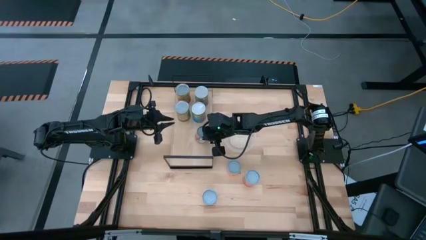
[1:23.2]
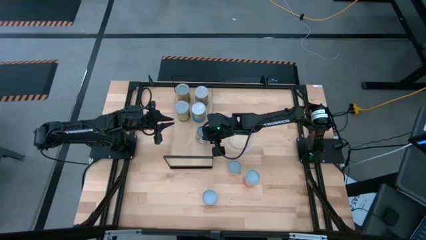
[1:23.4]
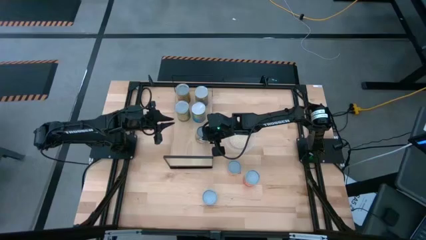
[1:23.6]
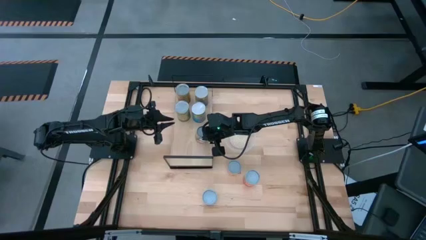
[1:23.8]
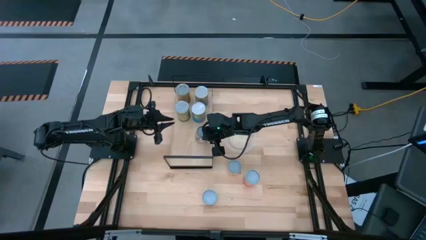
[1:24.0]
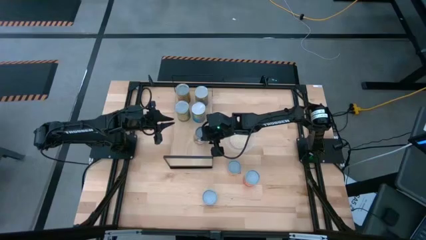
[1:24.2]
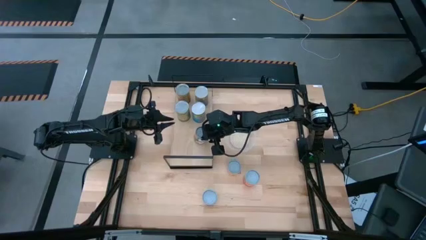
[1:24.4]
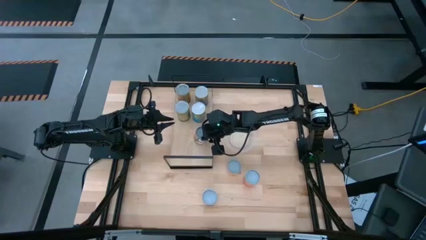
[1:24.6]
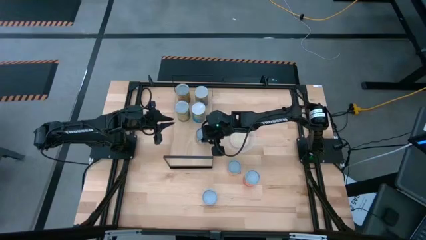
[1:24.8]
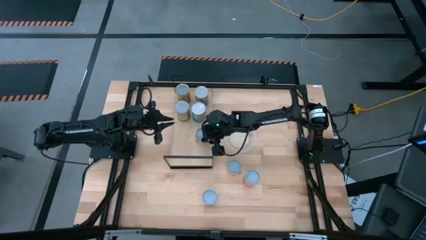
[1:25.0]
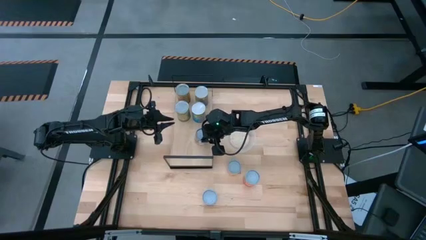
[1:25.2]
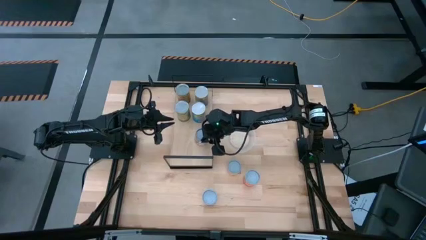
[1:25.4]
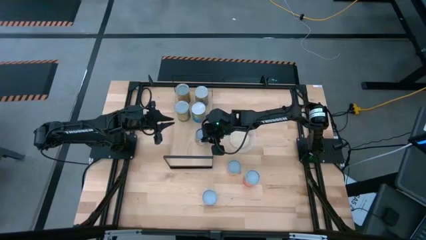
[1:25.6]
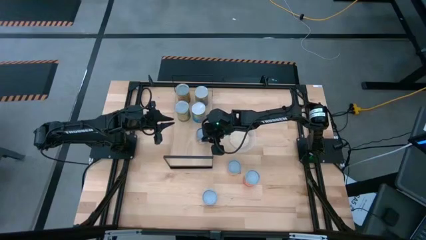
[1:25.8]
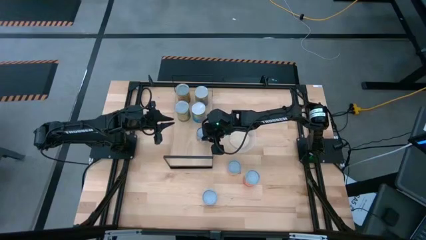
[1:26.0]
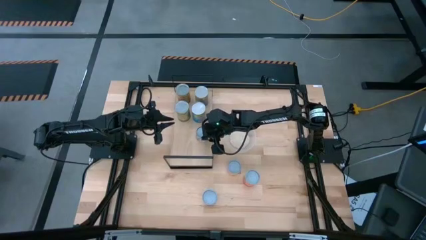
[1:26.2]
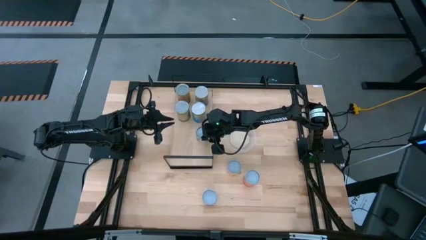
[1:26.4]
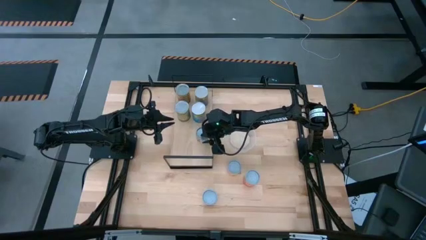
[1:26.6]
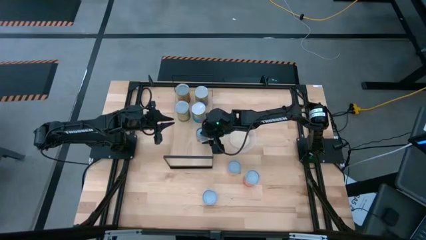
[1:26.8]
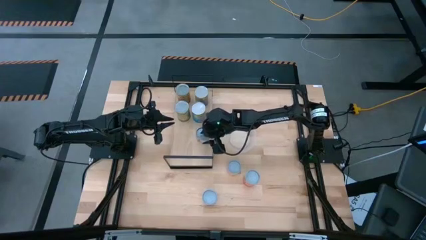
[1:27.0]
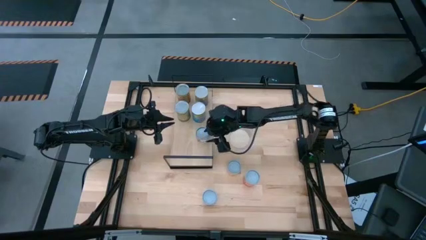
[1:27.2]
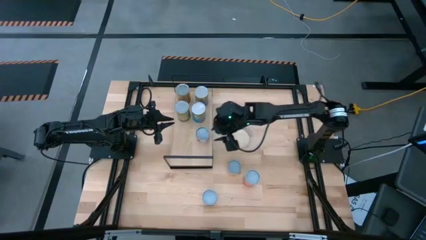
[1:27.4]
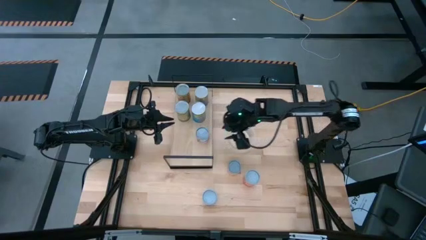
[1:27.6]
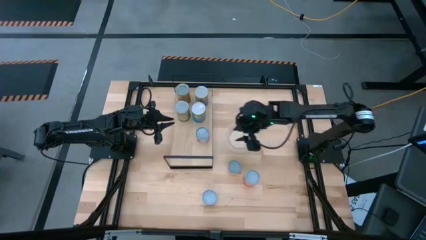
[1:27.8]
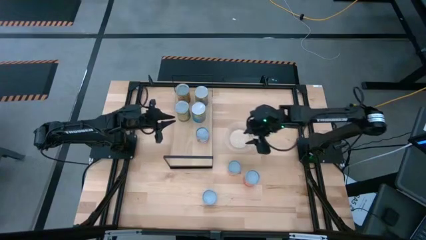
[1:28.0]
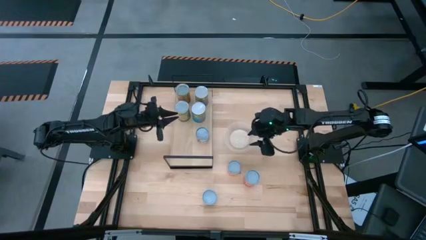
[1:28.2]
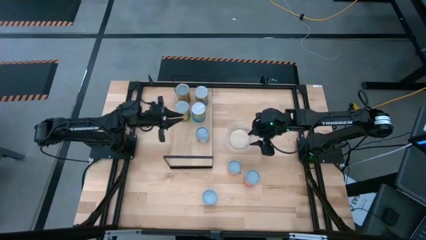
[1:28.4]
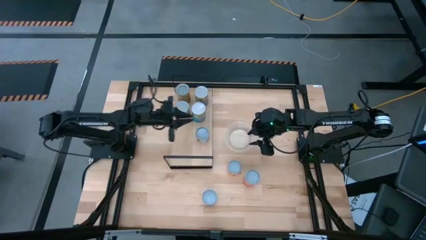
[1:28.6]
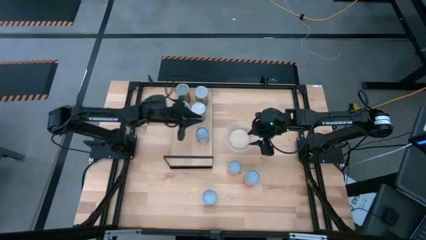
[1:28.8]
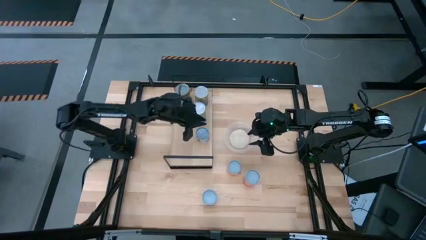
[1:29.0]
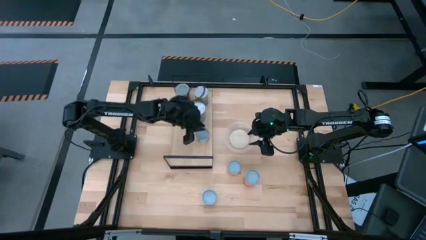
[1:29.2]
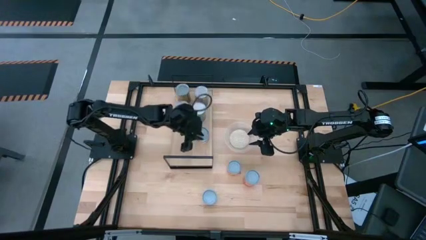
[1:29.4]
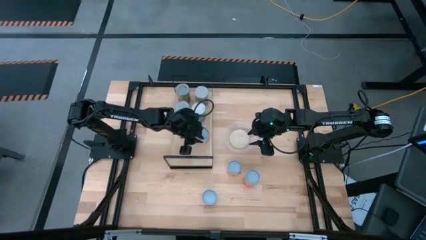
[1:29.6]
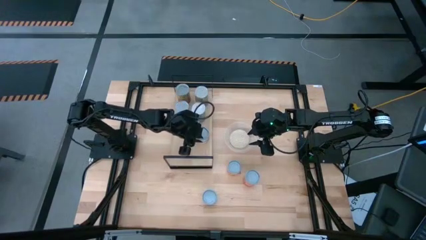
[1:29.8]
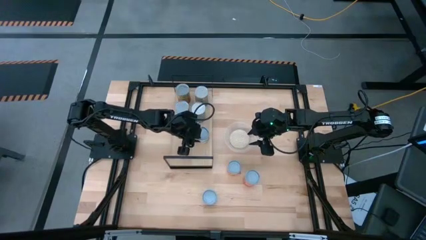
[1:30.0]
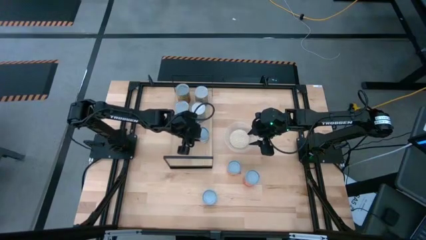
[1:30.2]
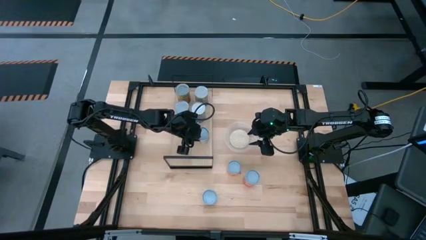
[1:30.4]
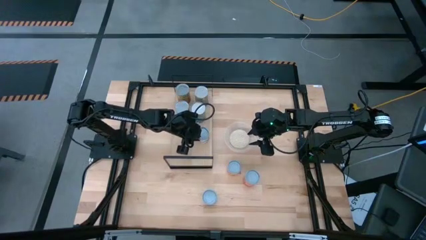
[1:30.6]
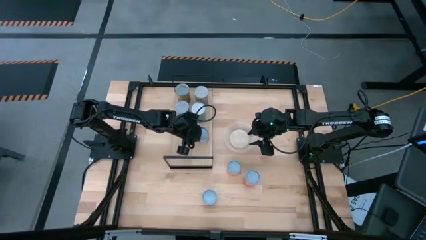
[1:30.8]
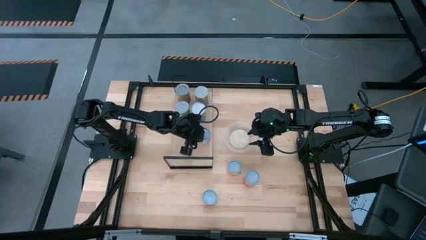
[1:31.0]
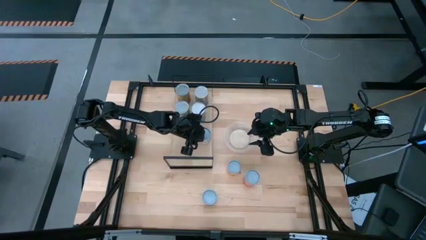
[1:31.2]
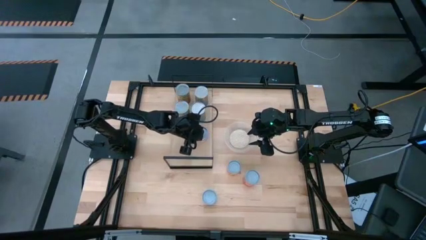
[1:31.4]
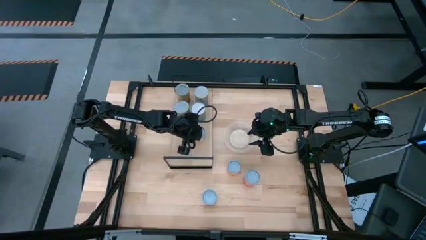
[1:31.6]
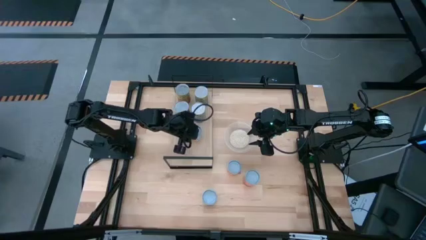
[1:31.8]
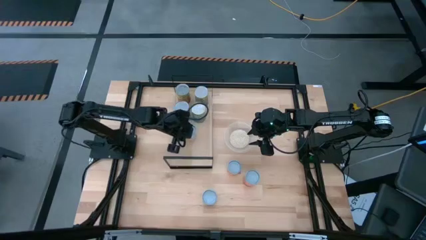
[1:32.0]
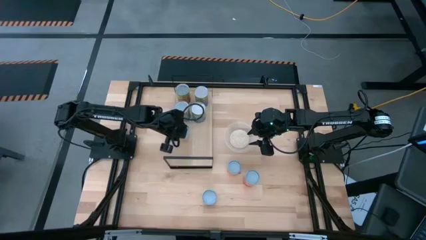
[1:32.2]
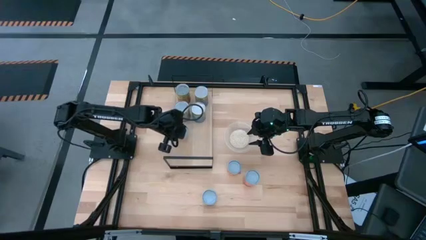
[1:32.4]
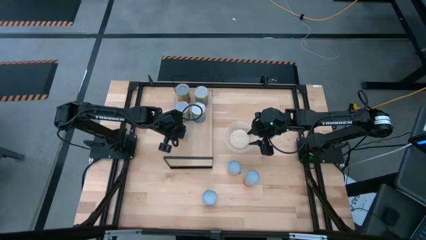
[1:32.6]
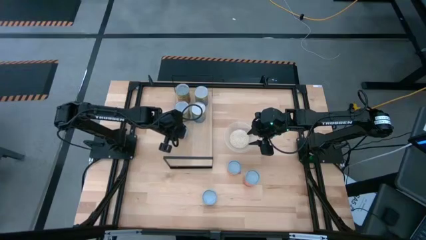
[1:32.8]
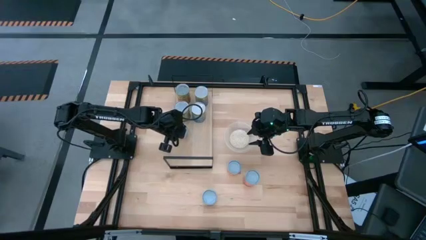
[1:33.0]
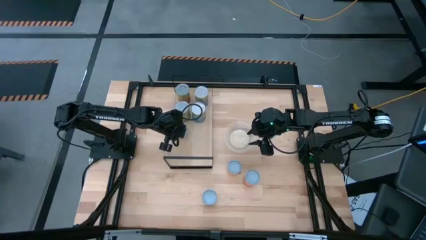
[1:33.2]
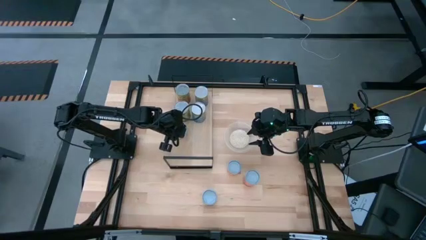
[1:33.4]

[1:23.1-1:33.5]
Task: Pick and place cans onto a shelf
Put the small canned oranges on the shelf
